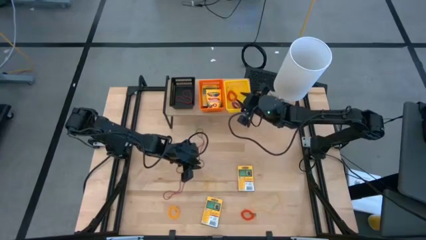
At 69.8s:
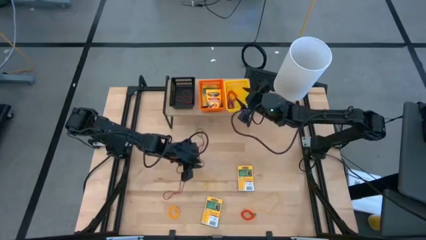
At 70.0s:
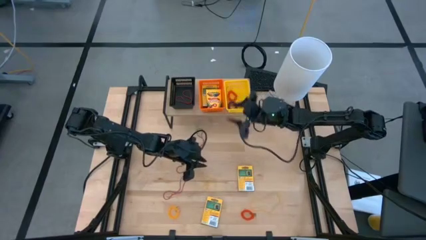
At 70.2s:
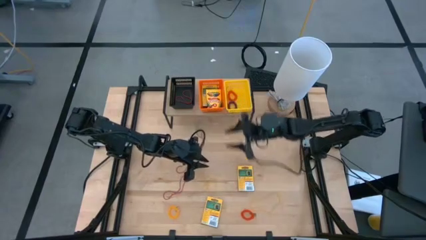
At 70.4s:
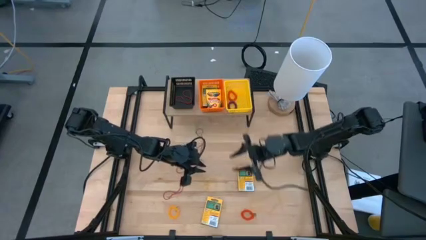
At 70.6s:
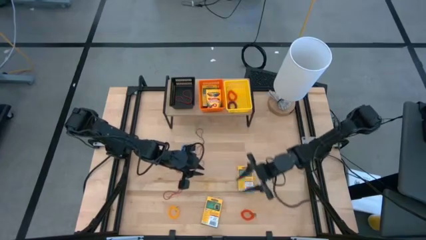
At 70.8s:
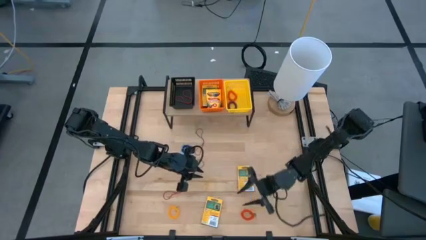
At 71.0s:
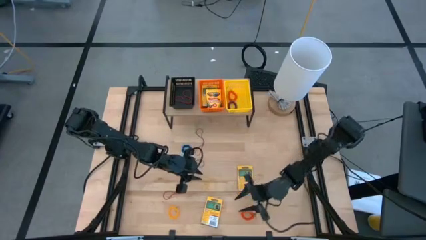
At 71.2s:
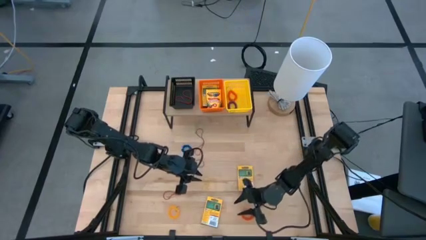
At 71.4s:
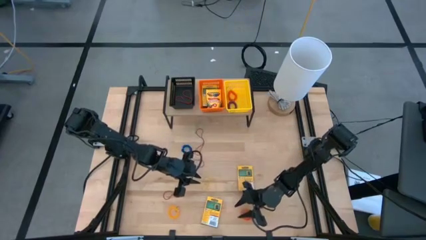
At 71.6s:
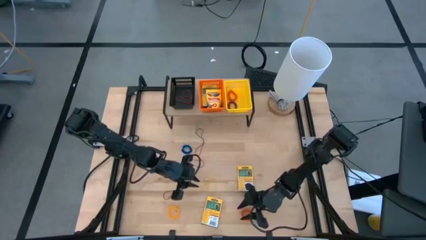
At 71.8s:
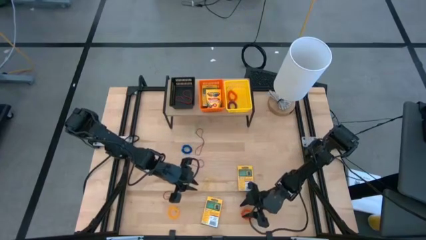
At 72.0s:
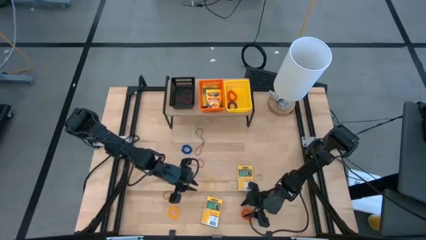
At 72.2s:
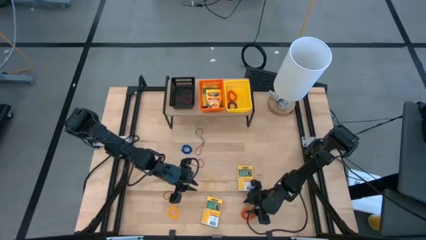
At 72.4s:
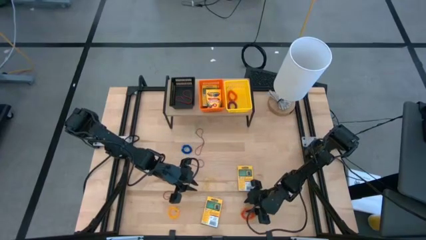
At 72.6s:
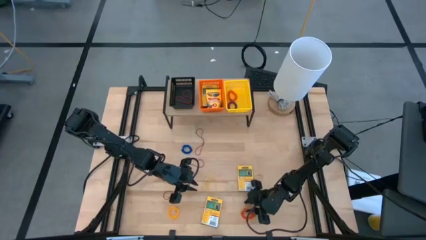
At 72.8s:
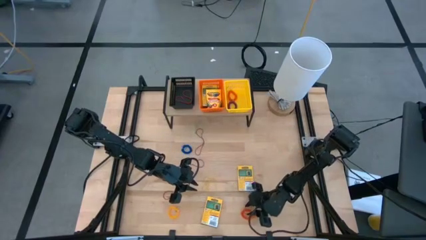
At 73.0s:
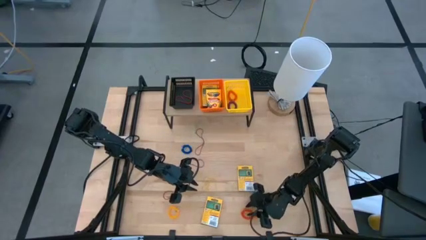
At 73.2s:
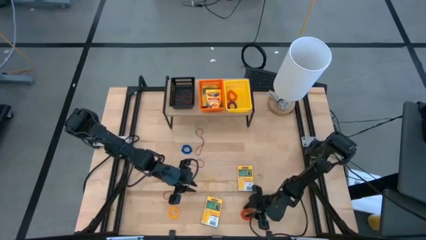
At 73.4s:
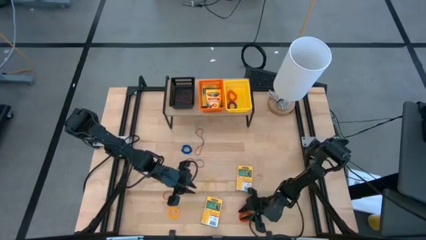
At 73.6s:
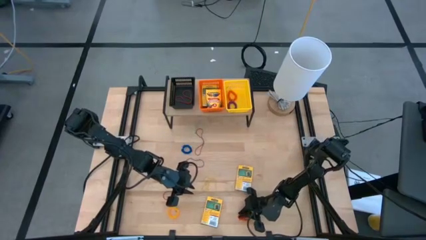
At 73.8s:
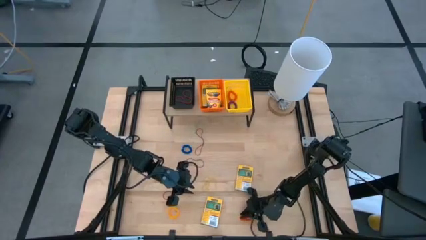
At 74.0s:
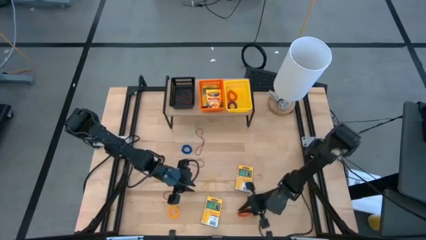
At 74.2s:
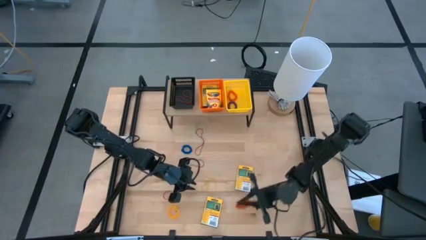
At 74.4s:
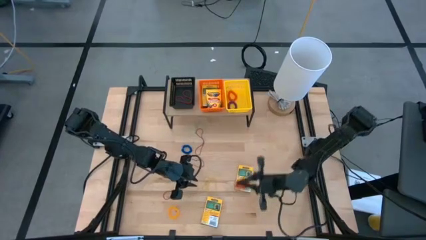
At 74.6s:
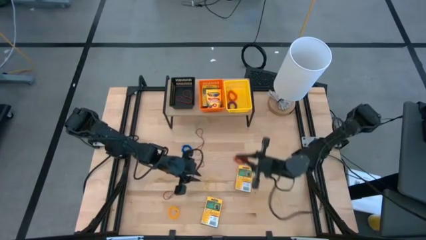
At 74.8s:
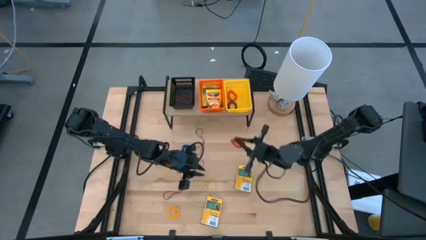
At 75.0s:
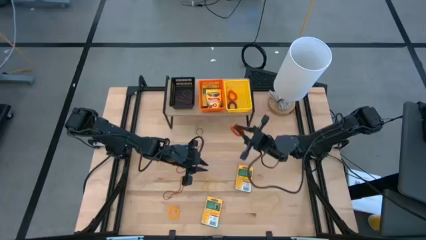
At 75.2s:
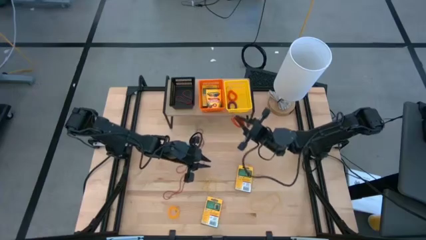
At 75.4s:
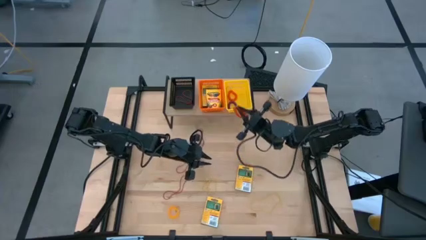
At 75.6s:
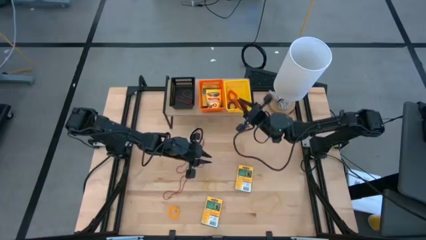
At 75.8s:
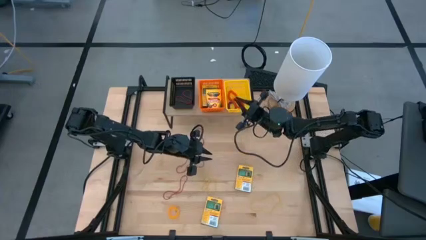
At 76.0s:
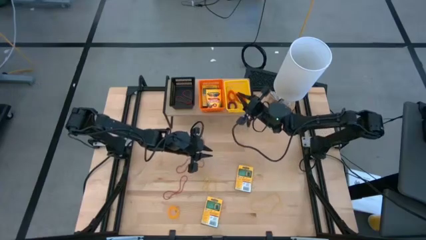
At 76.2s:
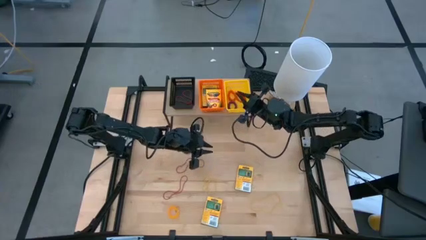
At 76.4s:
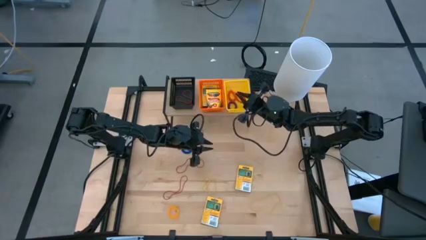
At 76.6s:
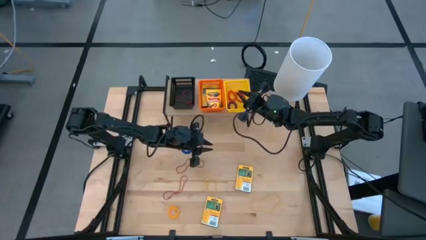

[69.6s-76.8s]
Task: Pick & Place Office Desk Supplies
Put the orange spring keychain into the yellow bin on the shelf

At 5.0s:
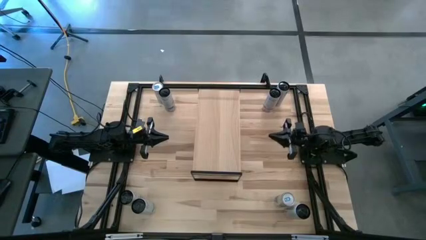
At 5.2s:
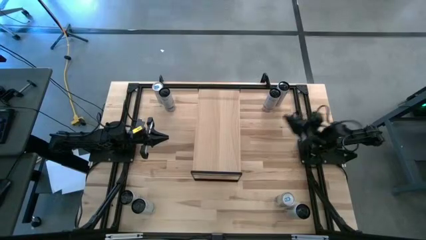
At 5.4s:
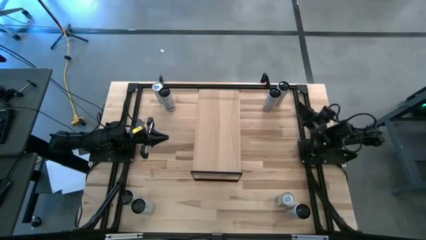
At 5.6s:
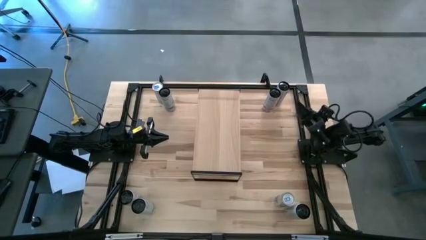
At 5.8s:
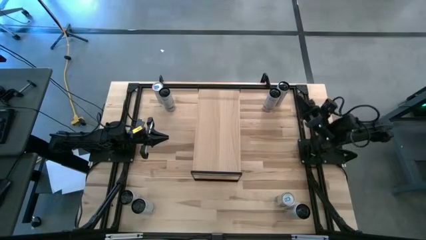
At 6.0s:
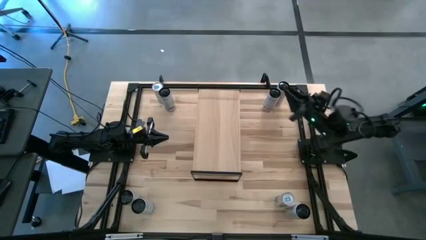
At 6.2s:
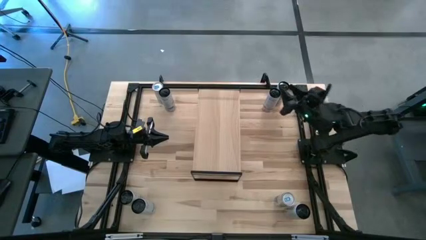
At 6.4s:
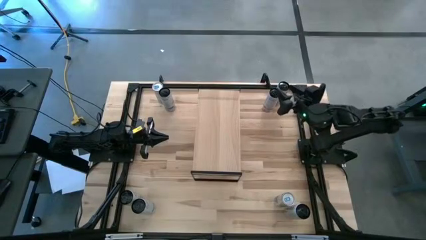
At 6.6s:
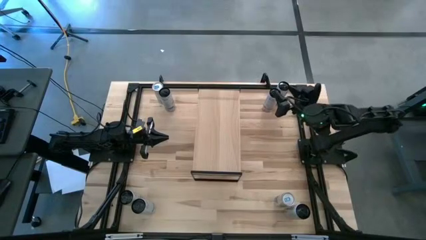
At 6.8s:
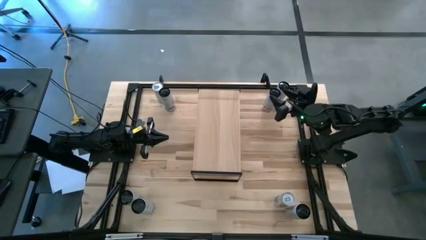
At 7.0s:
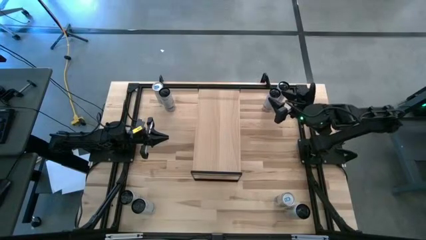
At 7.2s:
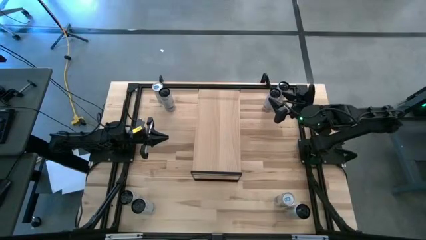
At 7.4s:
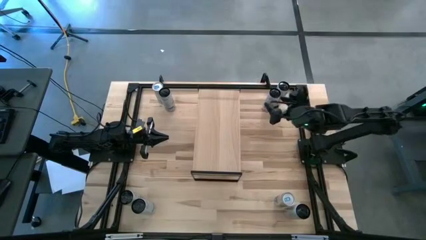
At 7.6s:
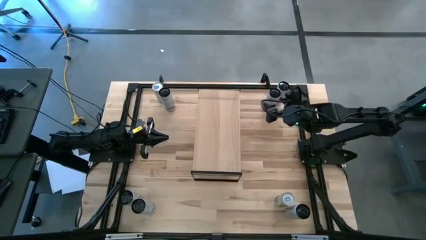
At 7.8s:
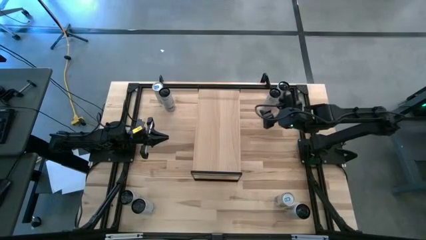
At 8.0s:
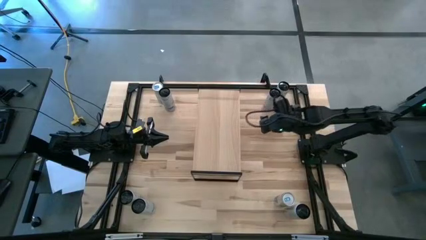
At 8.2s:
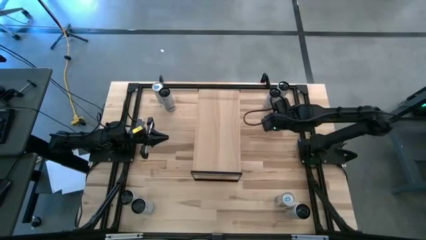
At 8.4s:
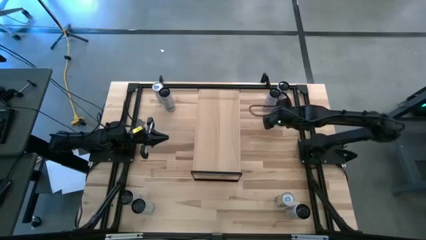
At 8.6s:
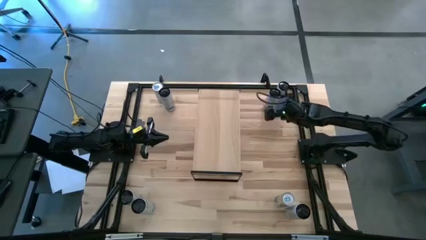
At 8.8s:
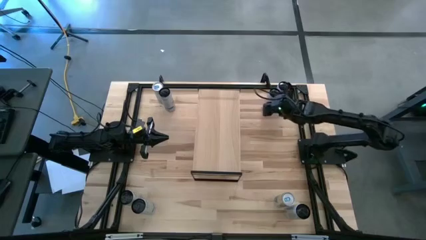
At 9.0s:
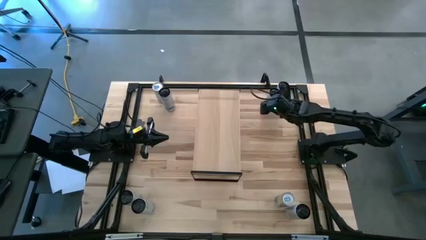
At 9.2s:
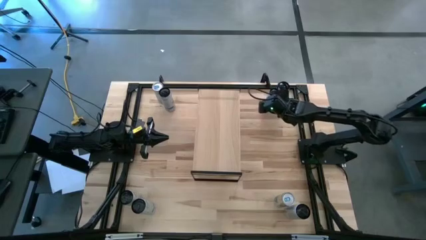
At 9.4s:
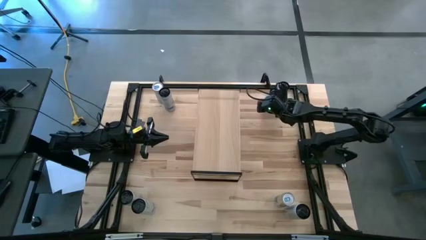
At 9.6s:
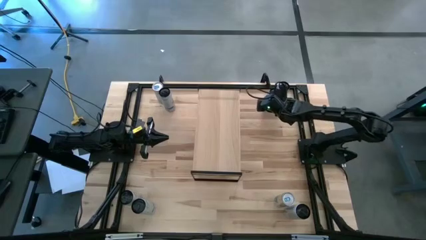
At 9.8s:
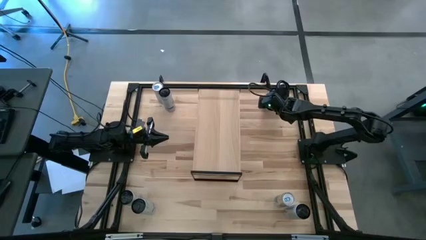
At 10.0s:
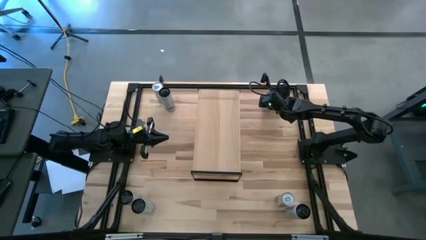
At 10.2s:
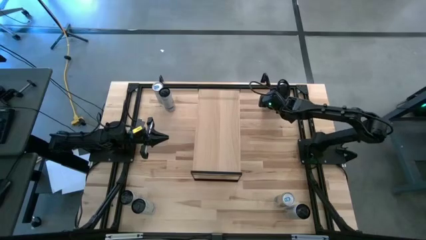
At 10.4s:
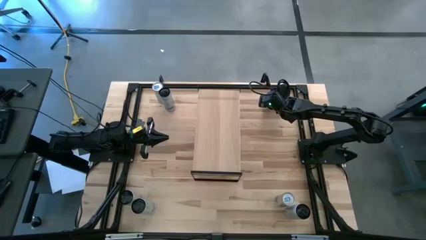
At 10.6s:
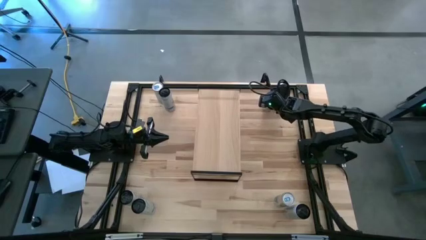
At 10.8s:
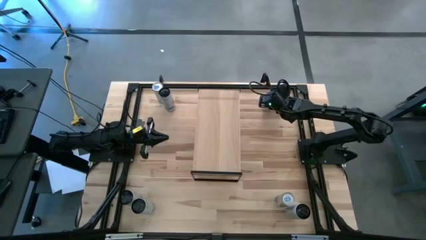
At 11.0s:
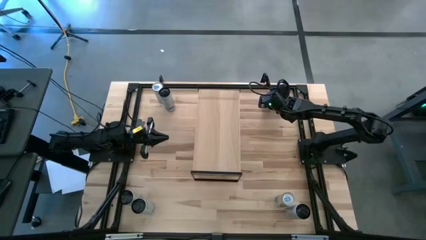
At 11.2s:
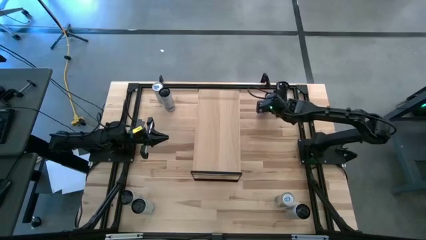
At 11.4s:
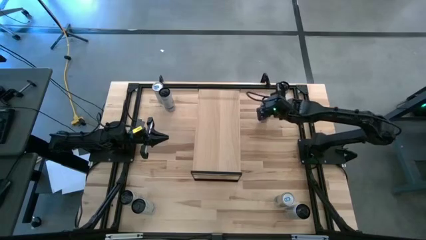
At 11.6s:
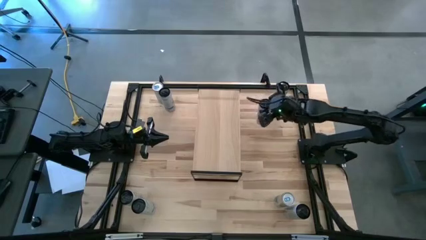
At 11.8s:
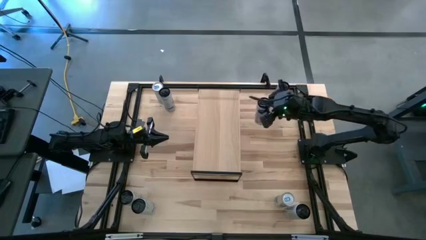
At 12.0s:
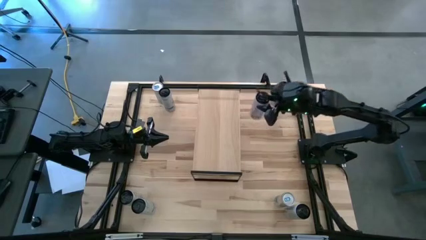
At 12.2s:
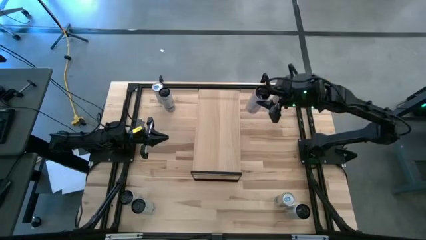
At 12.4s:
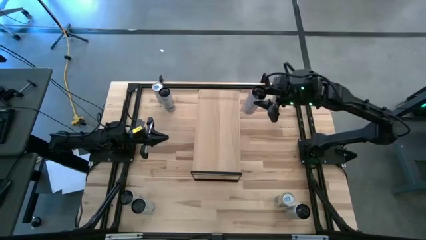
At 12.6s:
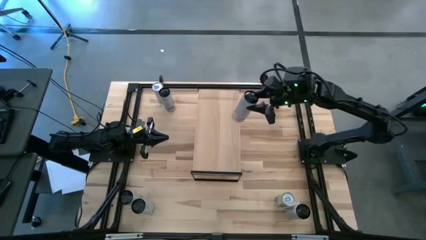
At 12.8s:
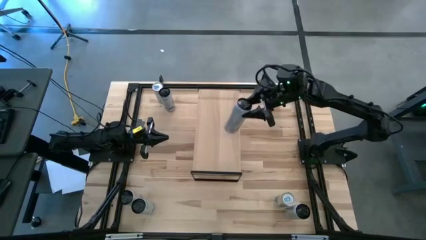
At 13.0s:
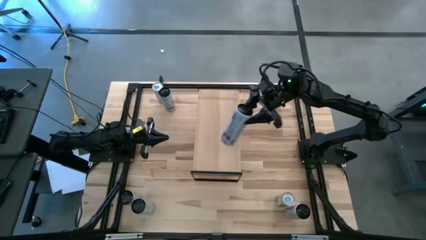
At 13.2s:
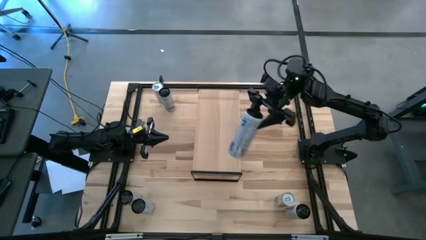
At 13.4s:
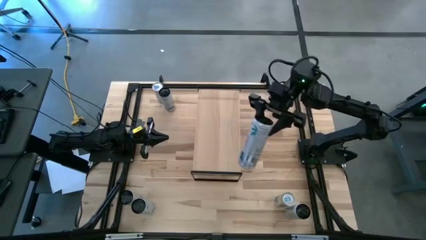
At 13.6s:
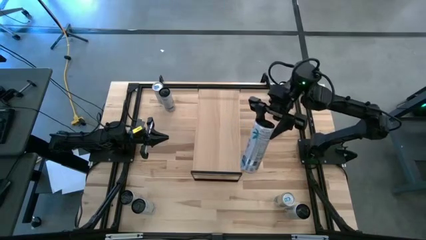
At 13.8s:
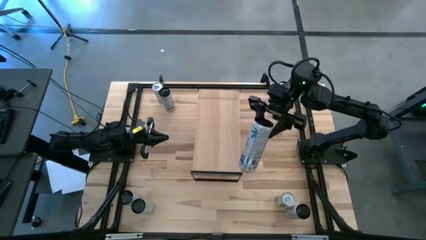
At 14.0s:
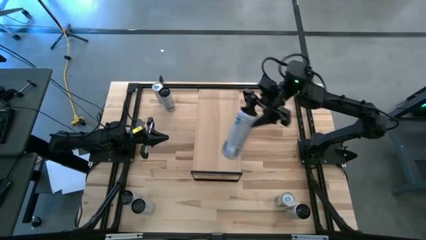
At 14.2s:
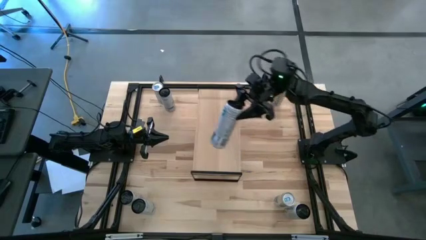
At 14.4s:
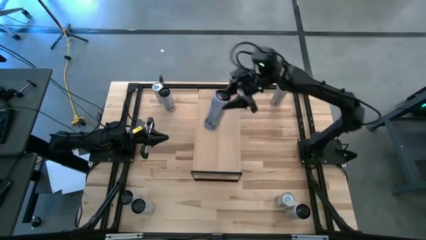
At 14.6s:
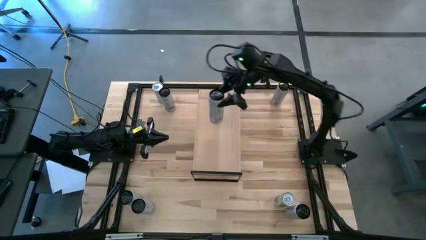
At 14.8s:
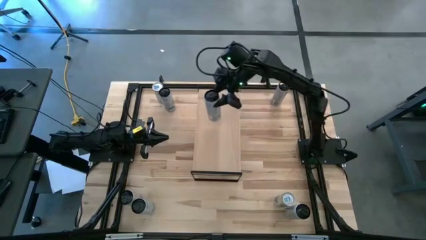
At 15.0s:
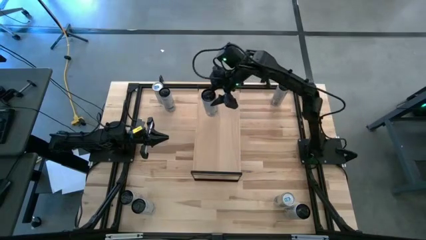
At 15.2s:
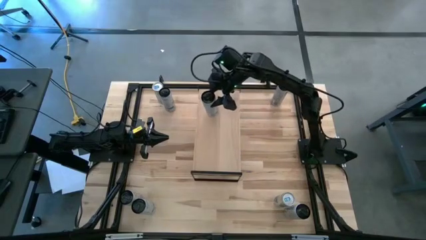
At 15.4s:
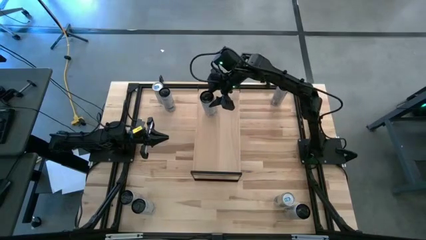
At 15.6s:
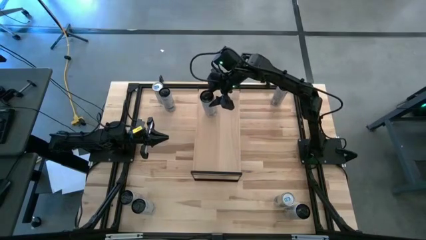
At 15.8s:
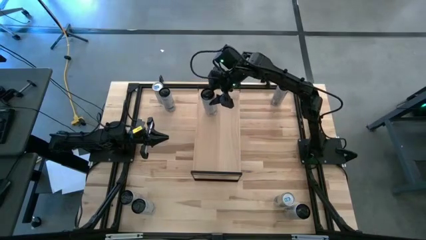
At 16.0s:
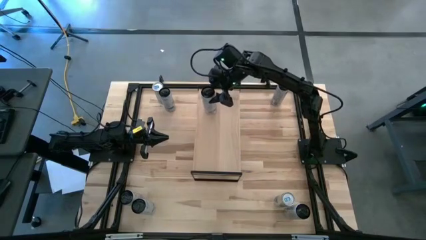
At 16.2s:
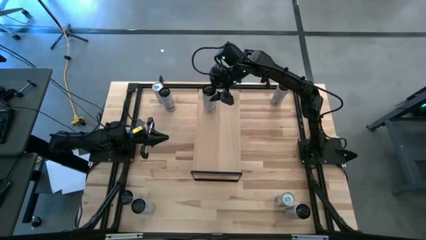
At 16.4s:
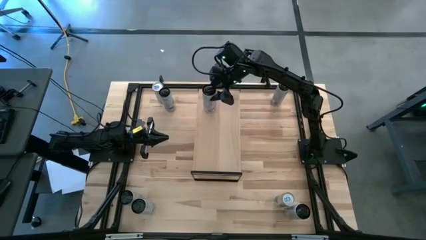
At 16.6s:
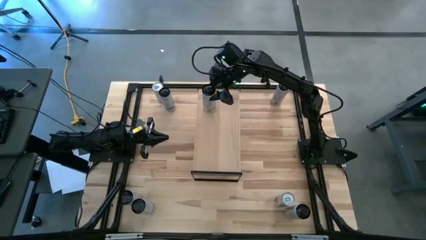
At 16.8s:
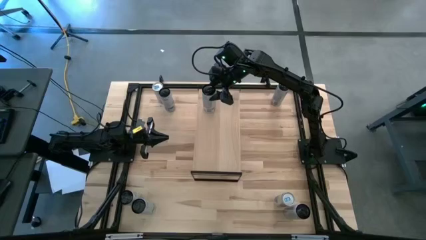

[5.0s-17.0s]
Task: Place canned beverage on shelf
Put the top white pink soda can on the shelf
